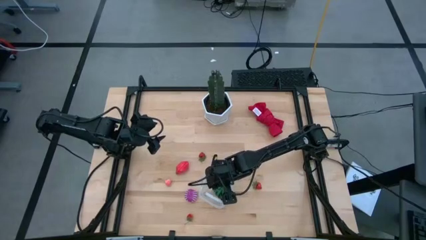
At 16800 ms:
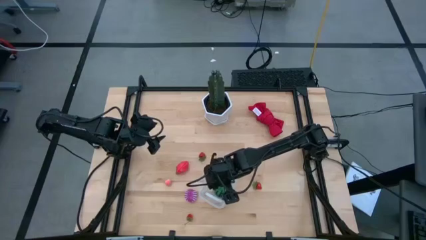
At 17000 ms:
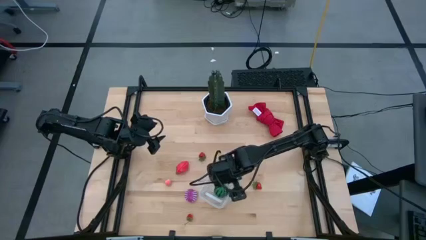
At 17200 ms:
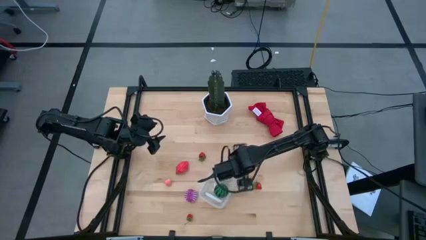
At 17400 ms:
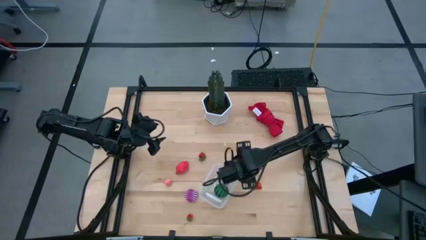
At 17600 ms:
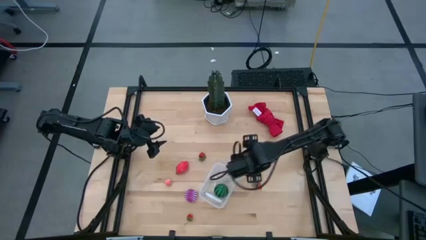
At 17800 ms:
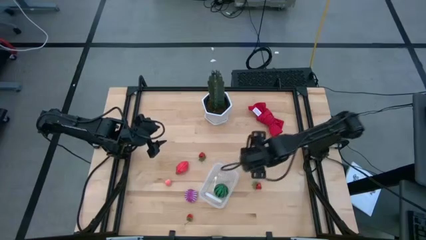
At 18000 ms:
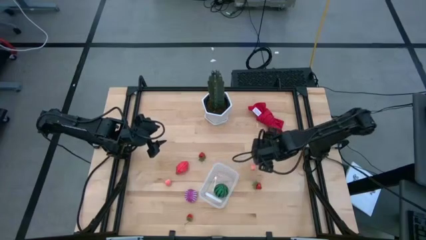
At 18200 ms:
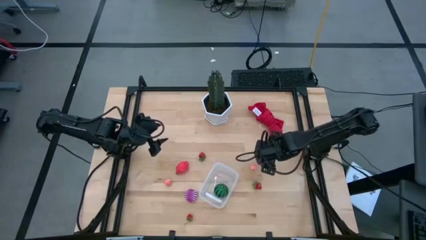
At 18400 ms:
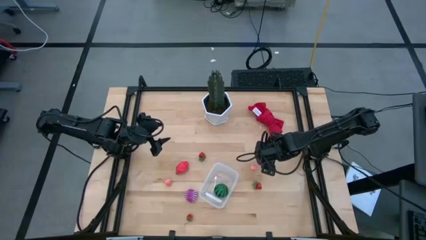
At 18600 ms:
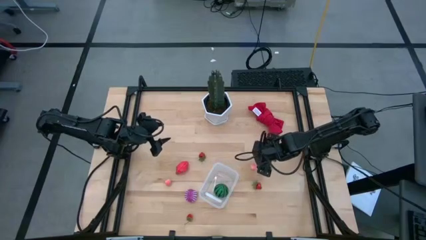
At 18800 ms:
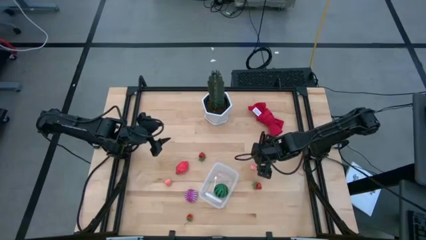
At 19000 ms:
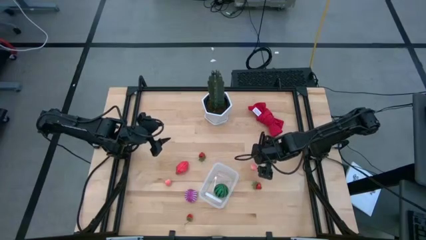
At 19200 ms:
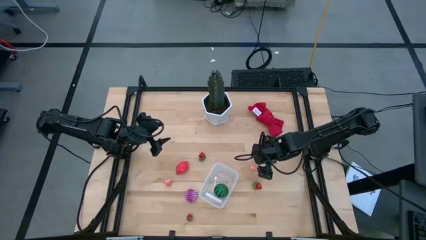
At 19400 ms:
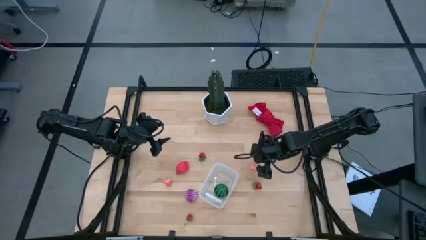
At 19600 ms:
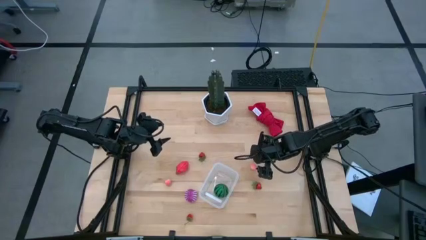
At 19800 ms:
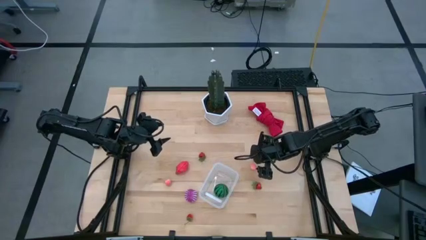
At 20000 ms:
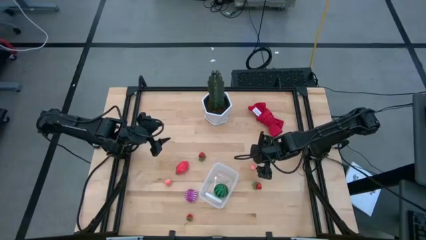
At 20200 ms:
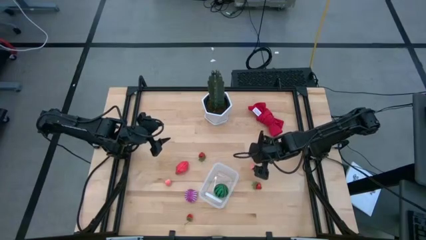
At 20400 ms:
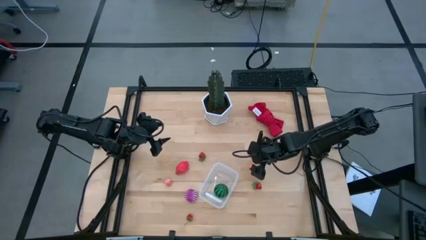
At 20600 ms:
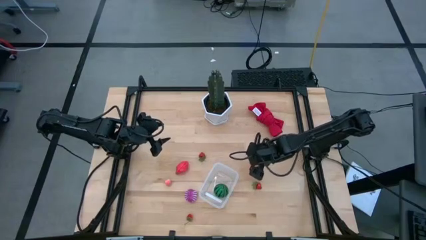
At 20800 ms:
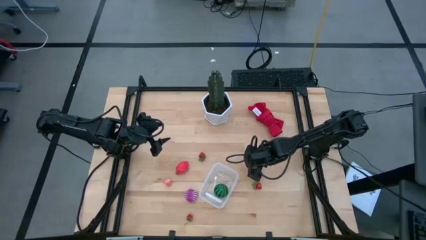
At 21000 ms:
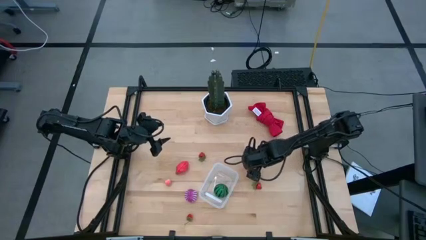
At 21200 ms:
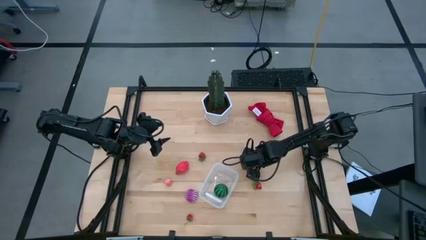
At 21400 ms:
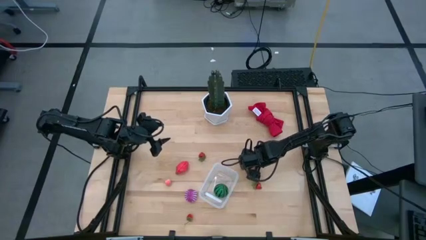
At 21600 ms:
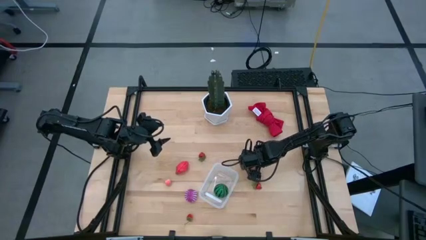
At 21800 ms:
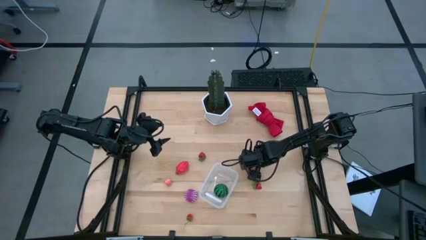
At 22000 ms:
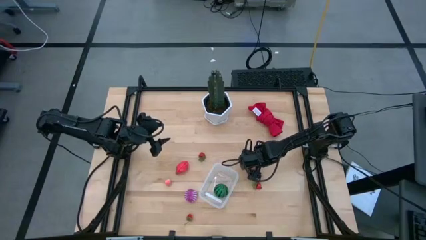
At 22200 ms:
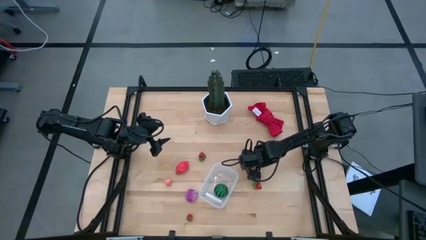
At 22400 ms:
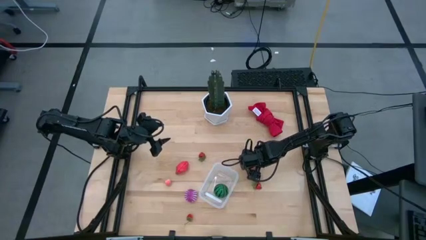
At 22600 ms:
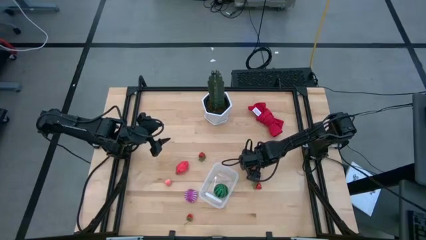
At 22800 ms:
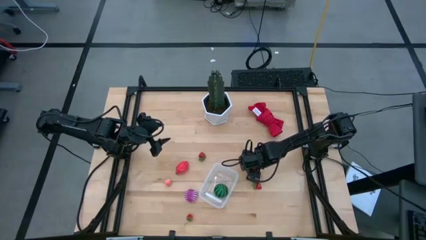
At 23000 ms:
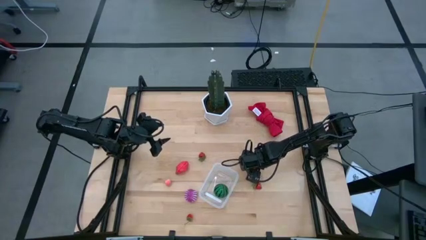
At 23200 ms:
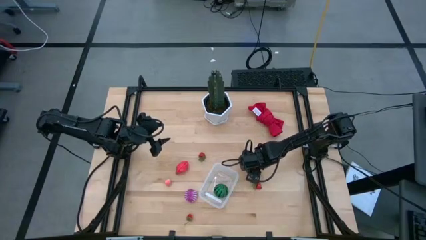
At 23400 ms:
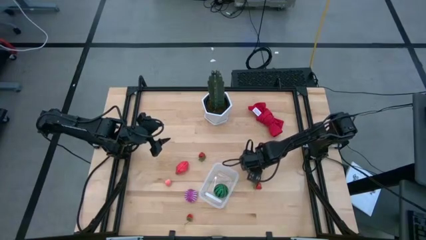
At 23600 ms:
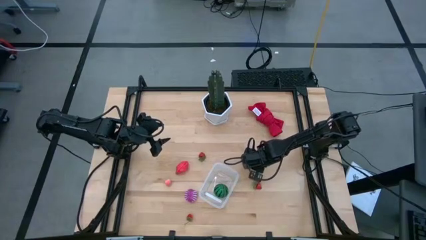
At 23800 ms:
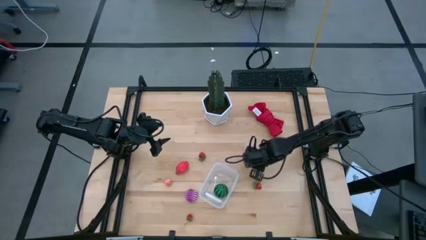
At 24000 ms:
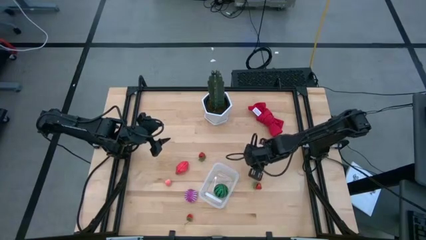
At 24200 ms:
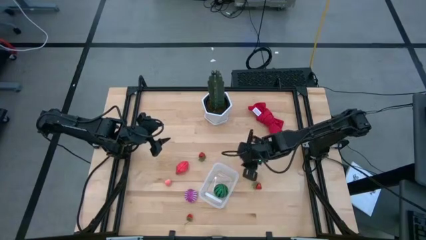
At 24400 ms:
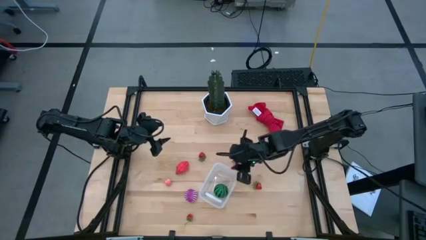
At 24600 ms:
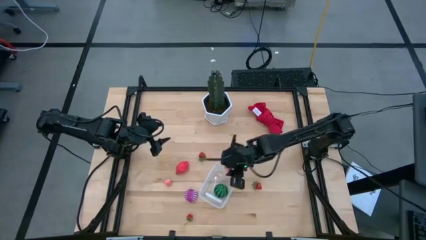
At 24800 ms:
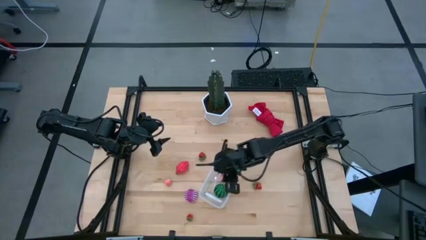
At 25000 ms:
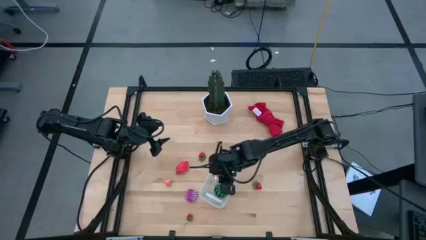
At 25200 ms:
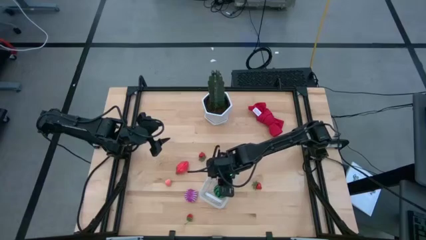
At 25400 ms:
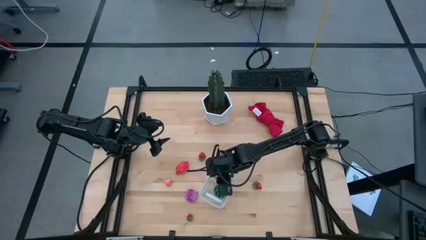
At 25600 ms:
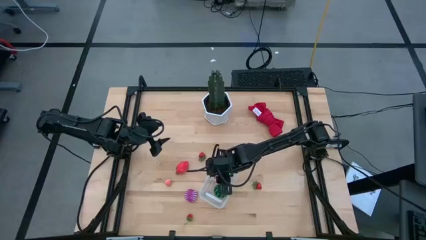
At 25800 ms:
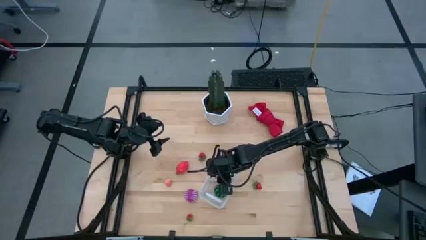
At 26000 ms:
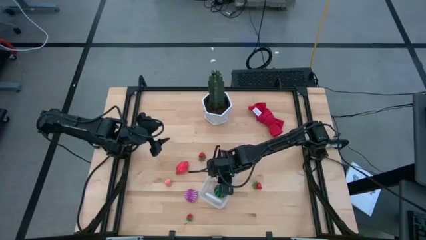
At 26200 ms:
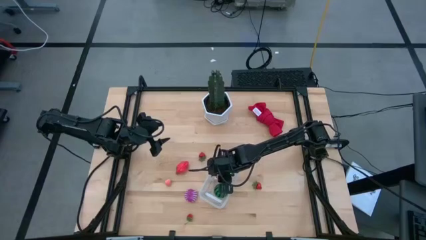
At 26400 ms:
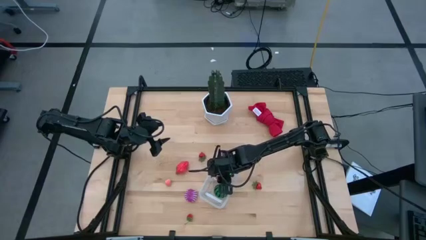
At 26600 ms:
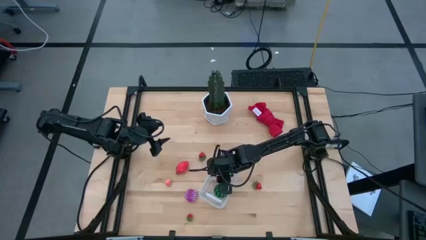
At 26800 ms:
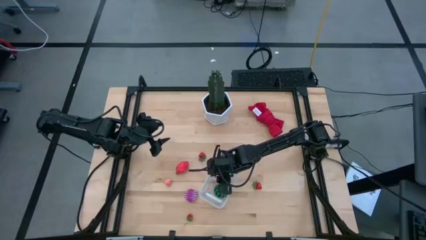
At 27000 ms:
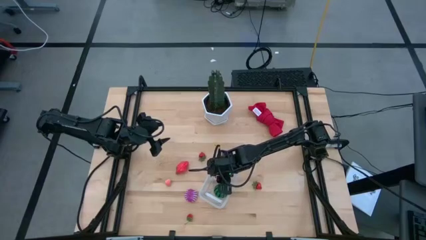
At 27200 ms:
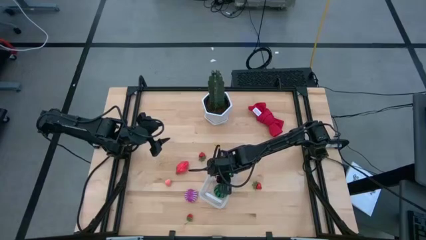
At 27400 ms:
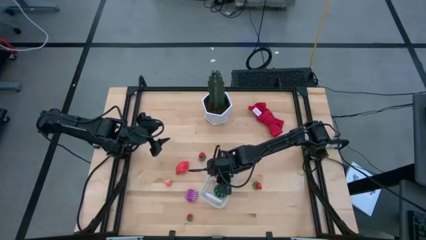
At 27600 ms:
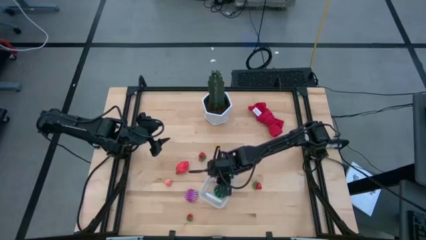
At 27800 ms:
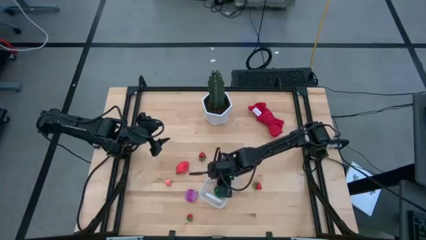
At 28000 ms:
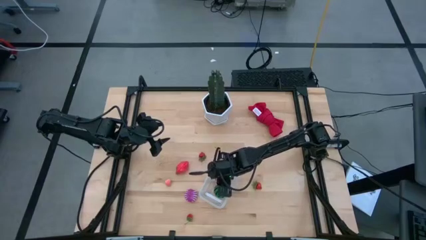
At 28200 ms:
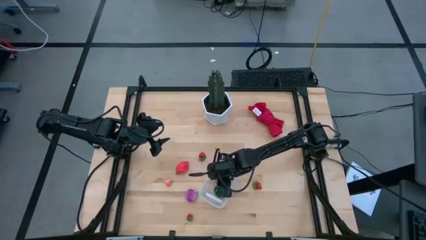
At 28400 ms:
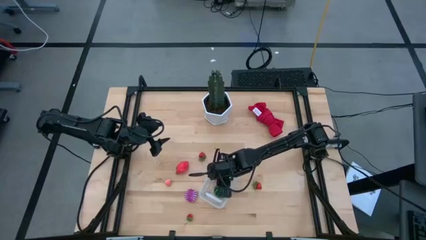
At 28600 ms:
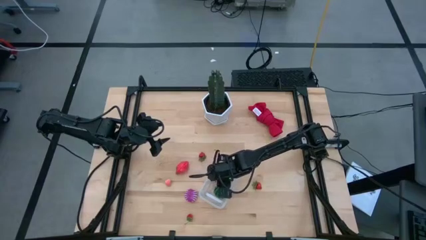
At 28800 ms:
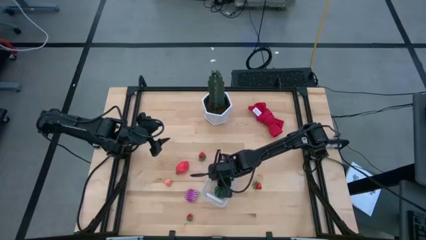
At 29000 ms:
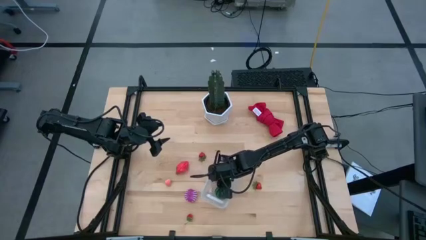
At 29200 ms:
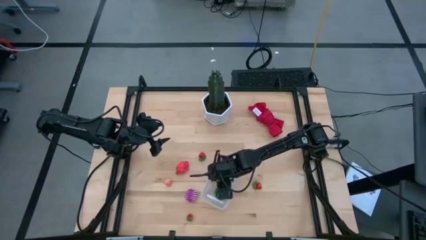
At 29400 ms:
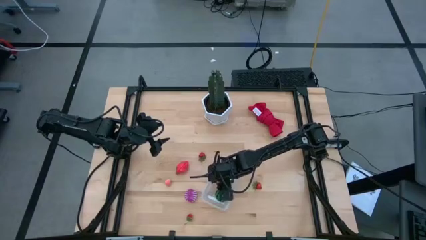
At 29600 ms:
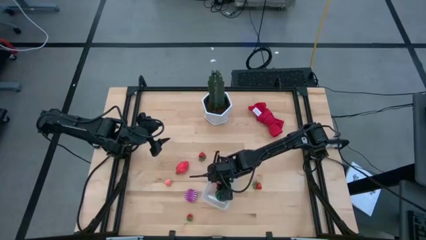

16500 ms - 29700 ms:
Task: Pick and placing Produce into tupperware
Put the right pink peach into the transparent bin
